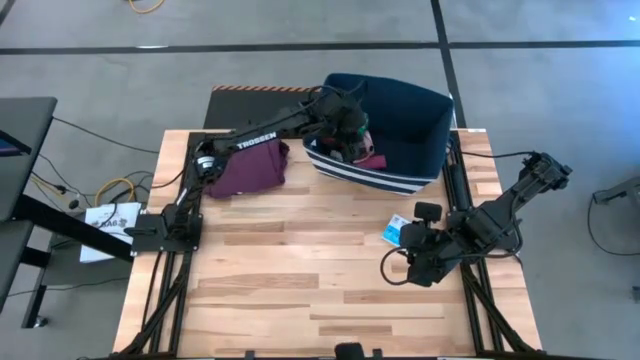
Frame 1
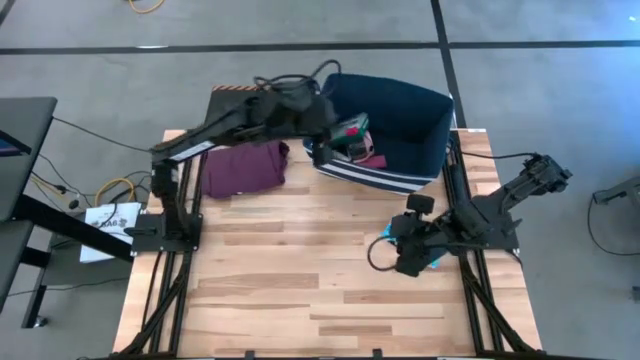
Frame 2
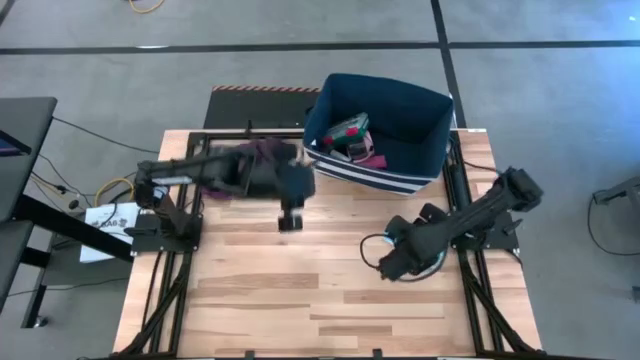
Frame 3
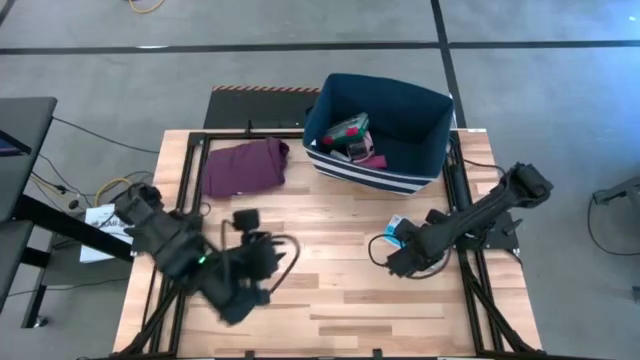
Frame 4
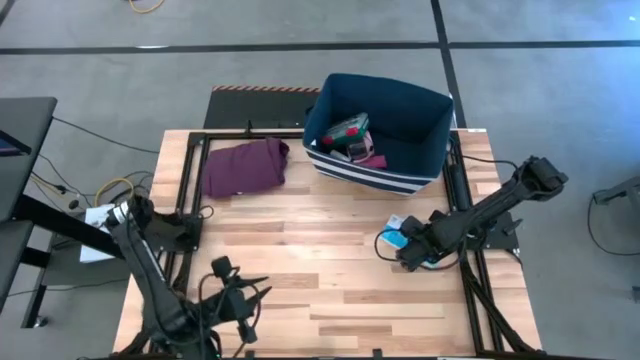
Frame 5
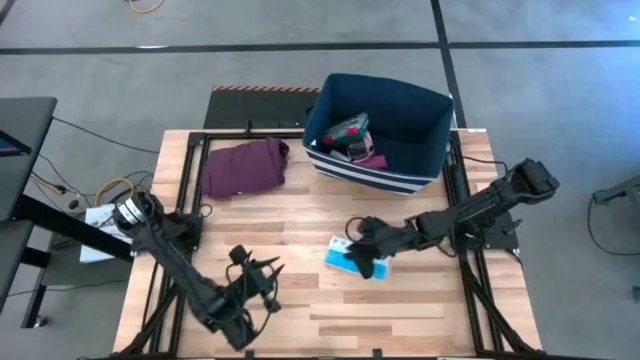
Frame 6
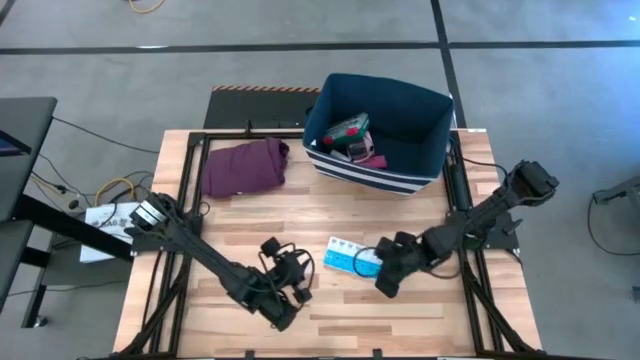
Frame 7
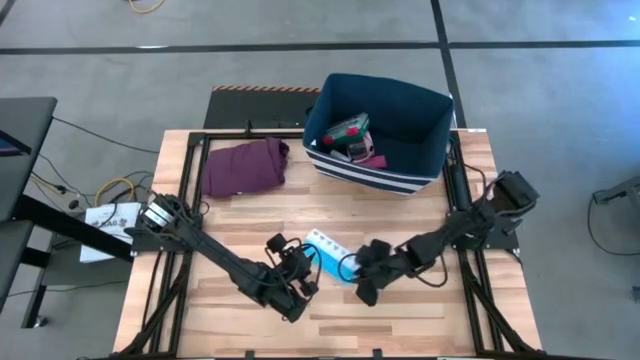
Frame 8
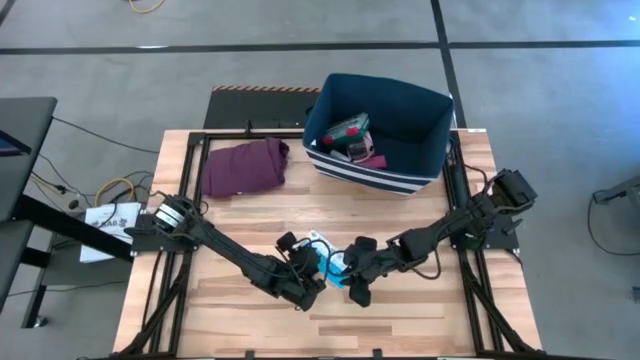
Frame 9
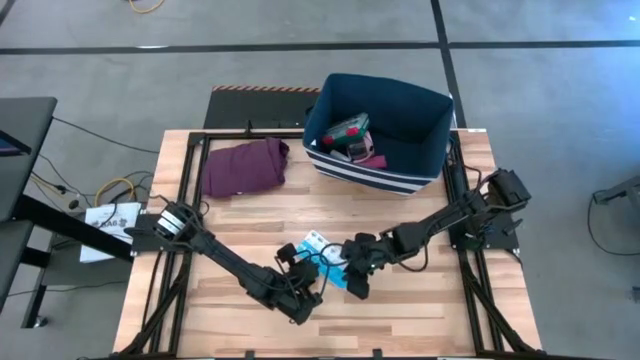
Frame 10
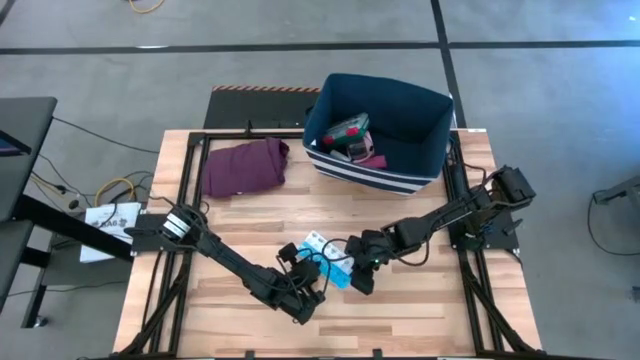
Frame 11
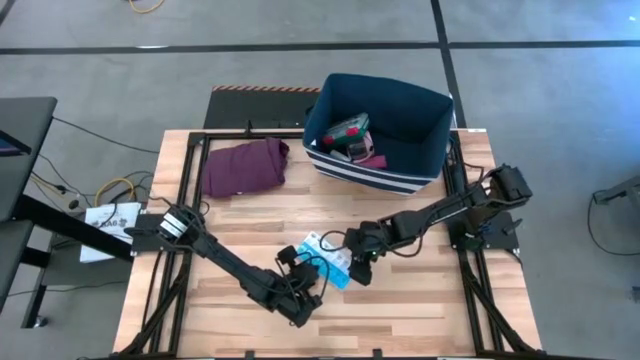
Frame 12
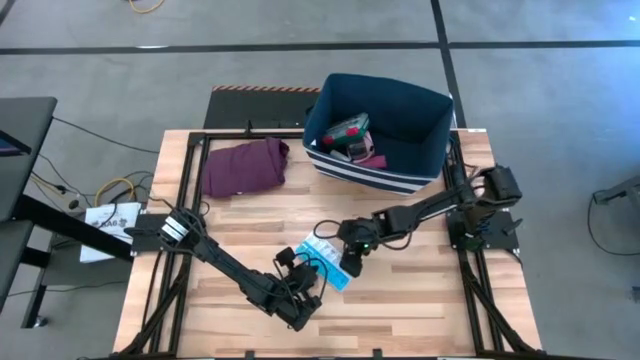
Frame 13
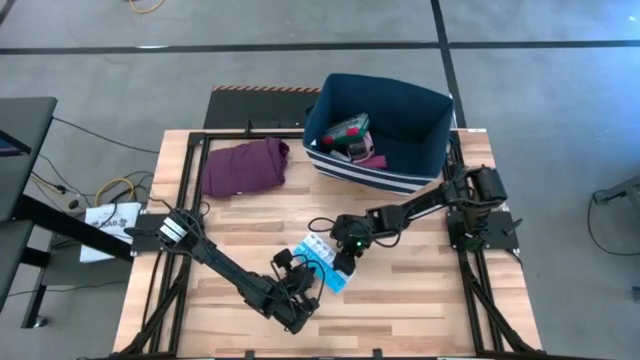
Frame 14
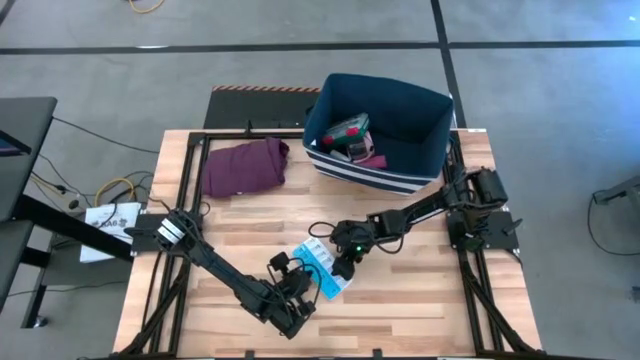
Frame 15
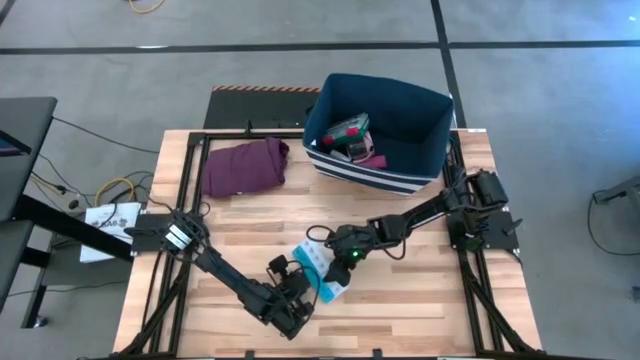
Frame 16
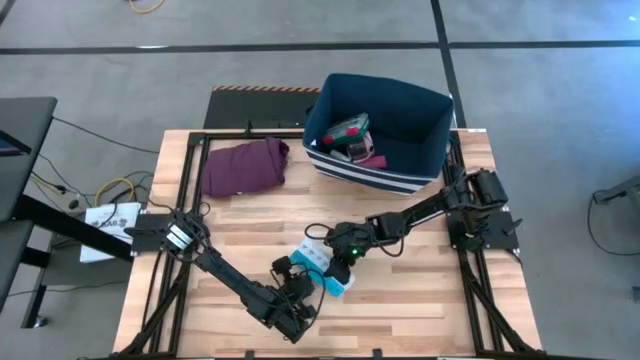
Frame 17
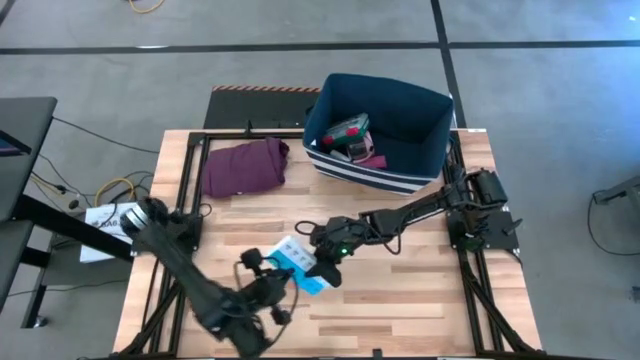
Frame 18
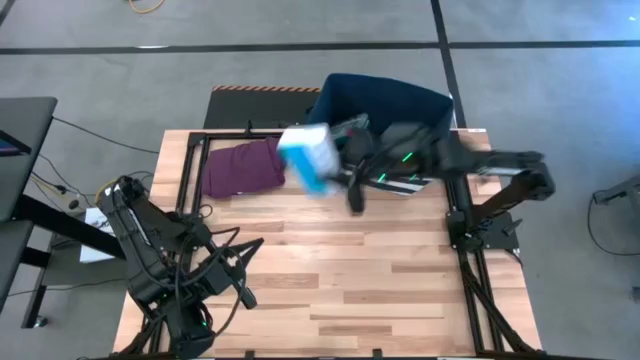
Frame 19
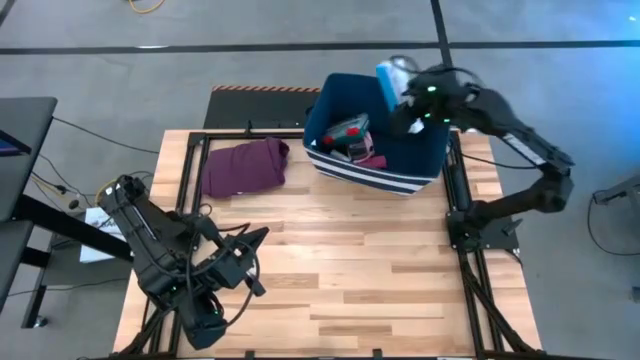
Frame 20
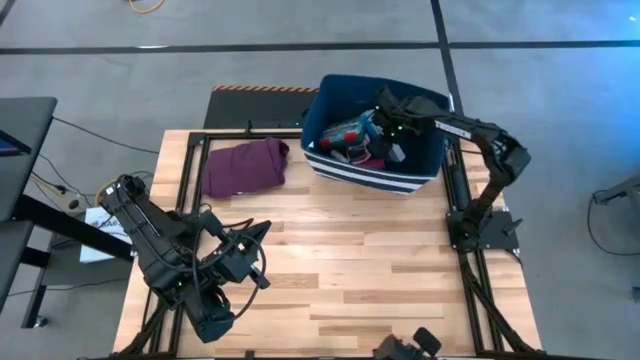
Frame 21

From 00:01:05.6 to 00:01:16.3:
Task: Pick & place medical supplies in basket/bin
Put the white and blue pill organizer into the blue bin

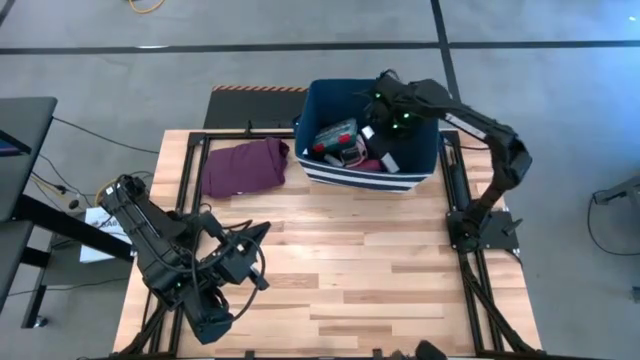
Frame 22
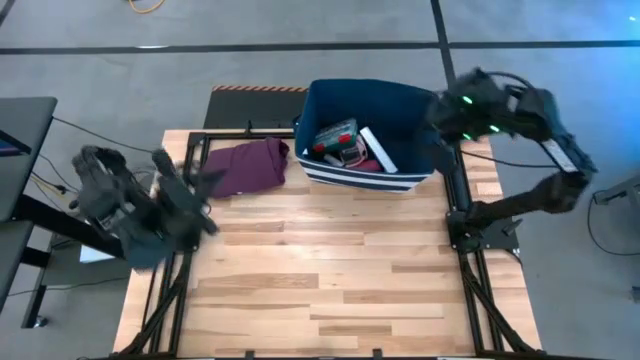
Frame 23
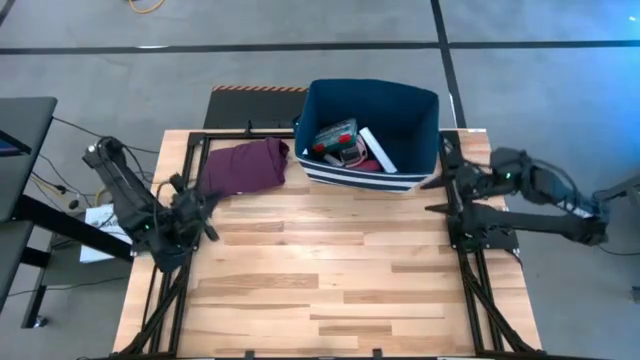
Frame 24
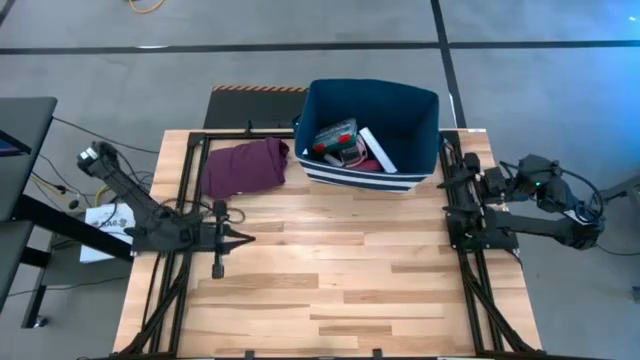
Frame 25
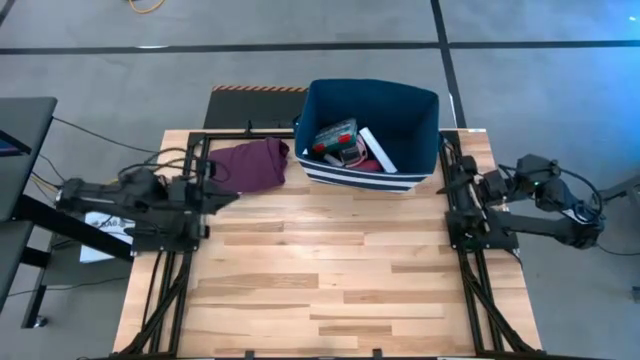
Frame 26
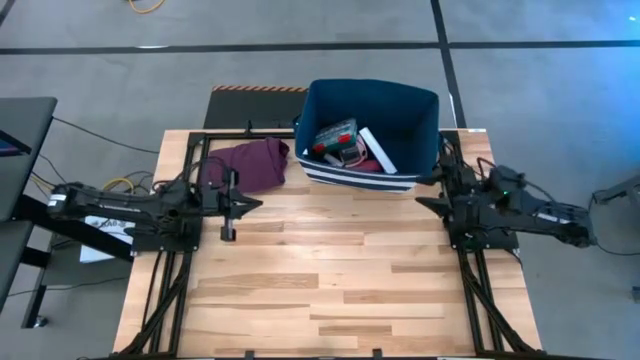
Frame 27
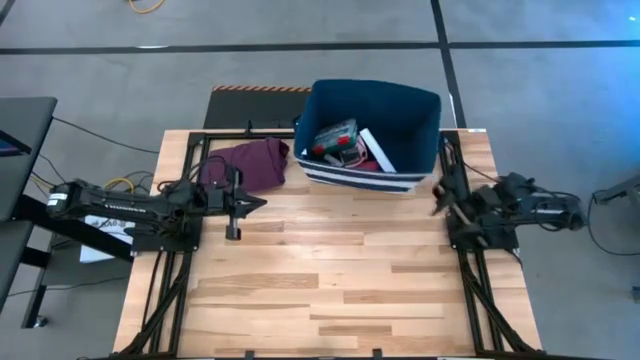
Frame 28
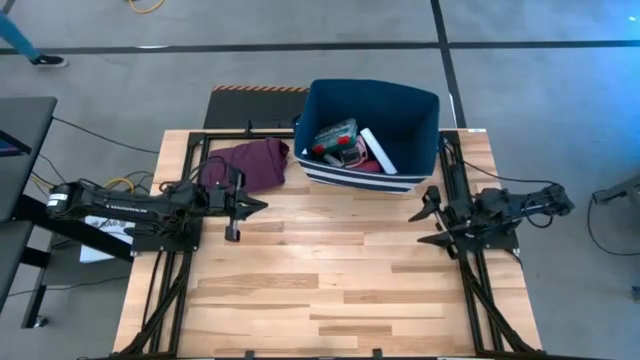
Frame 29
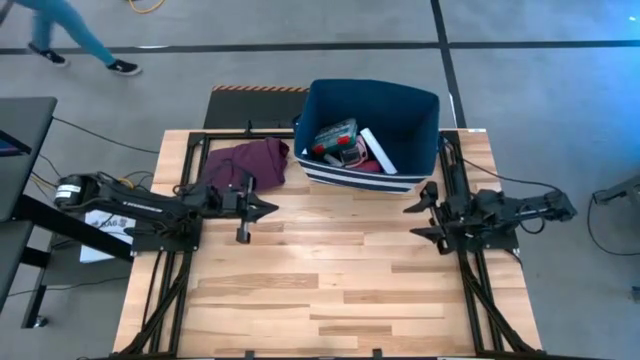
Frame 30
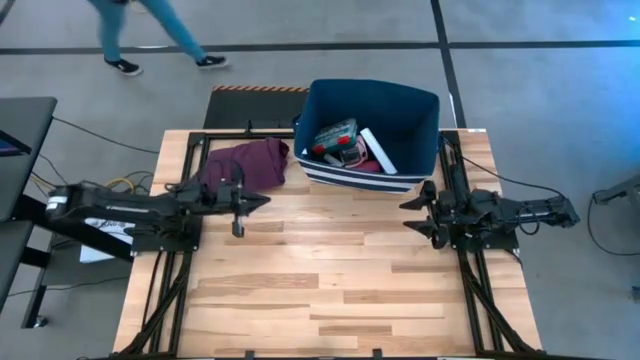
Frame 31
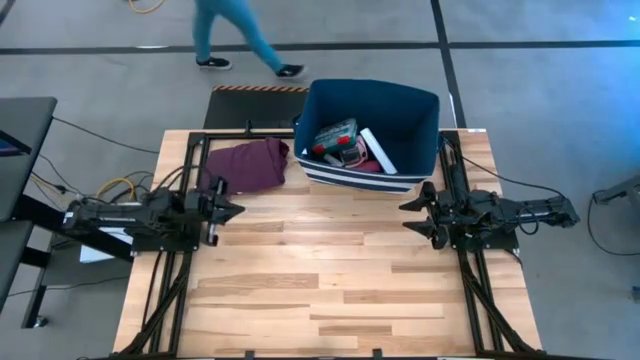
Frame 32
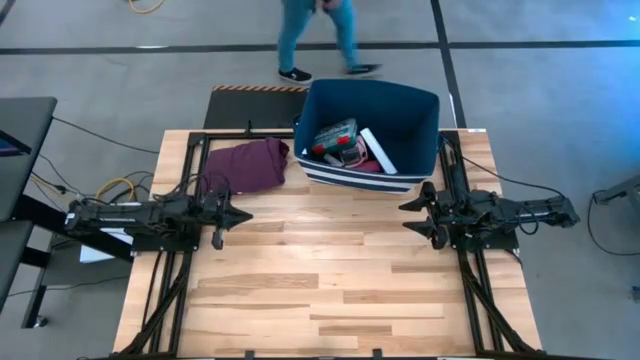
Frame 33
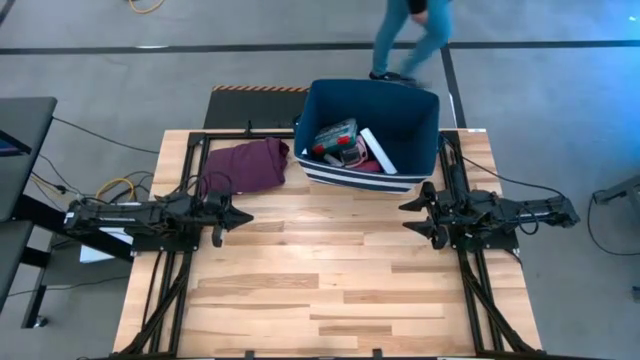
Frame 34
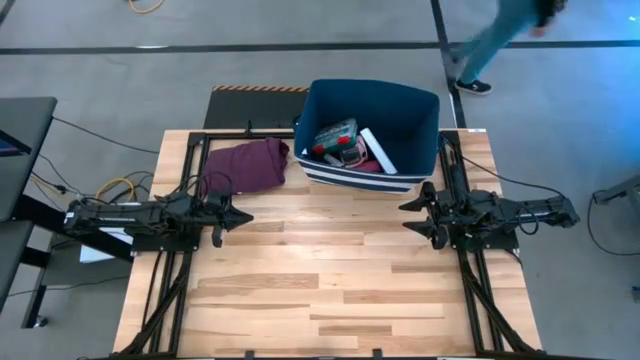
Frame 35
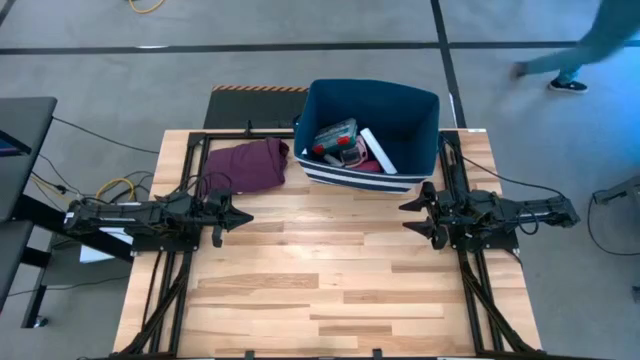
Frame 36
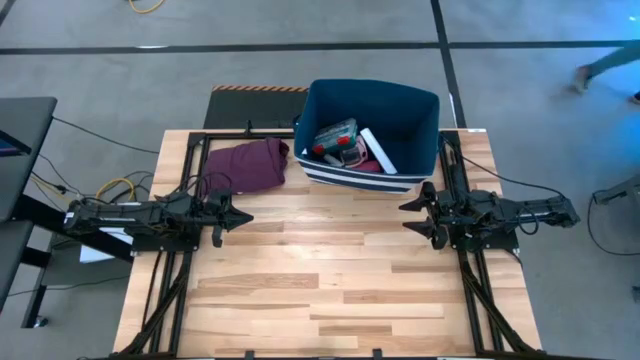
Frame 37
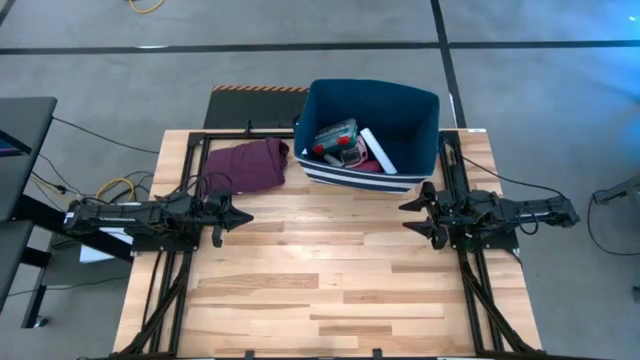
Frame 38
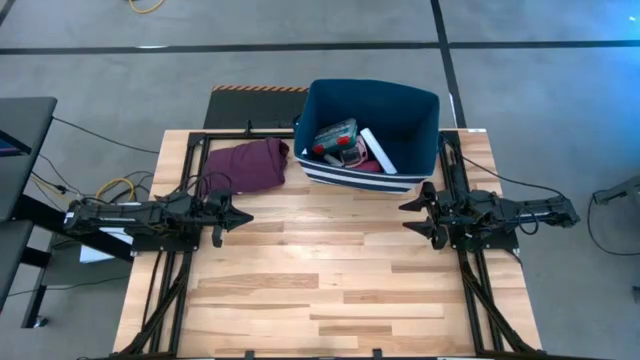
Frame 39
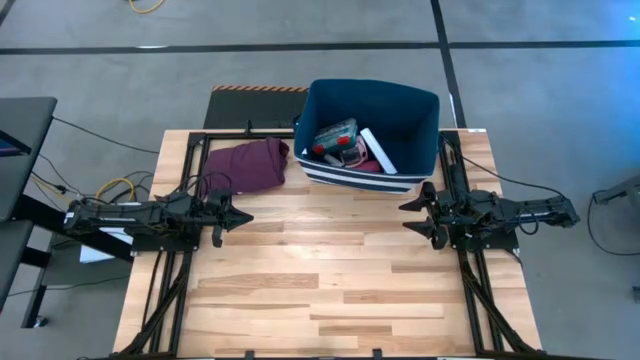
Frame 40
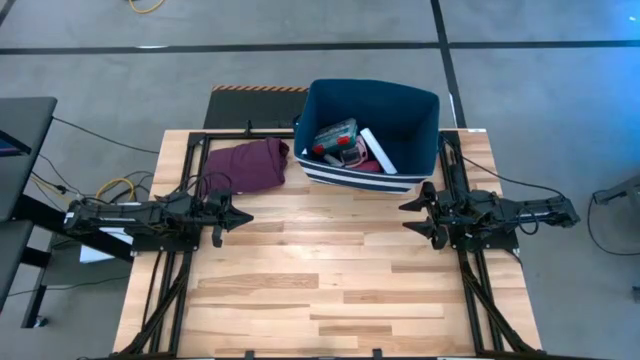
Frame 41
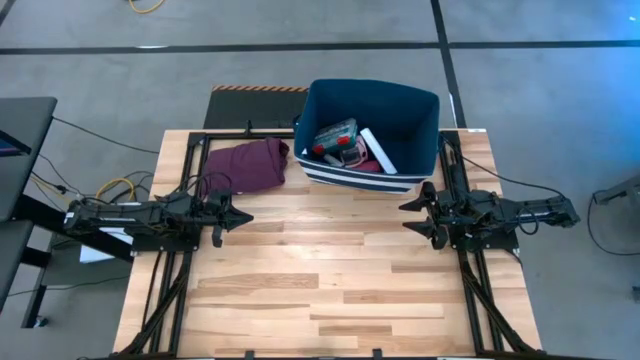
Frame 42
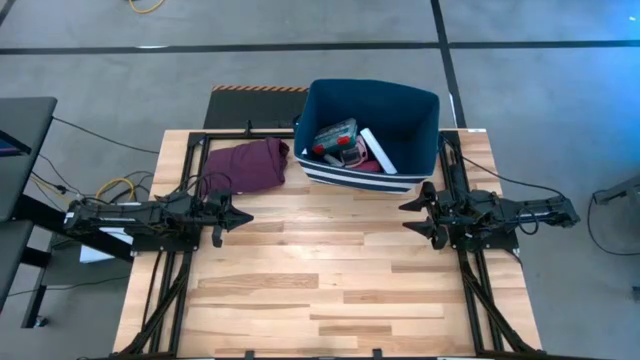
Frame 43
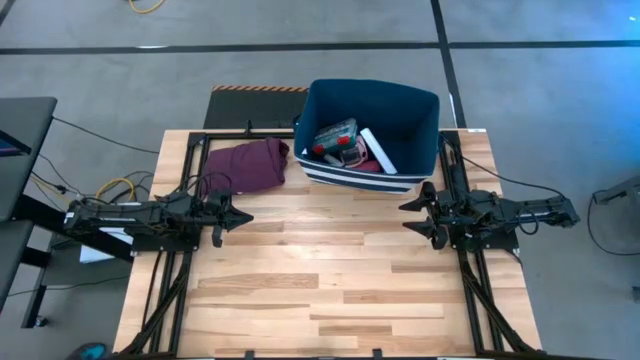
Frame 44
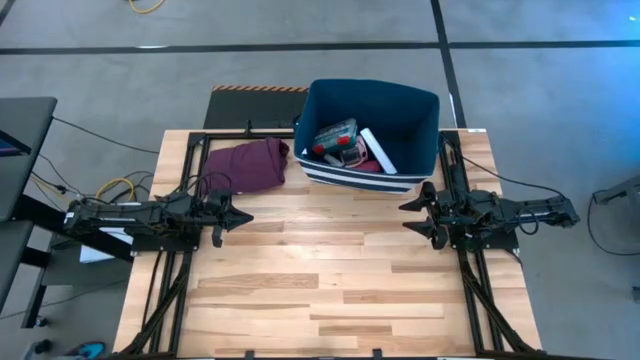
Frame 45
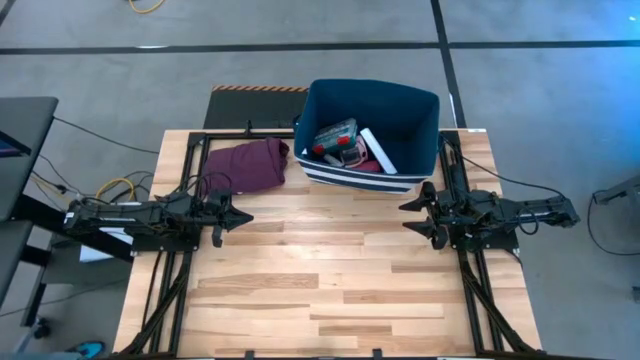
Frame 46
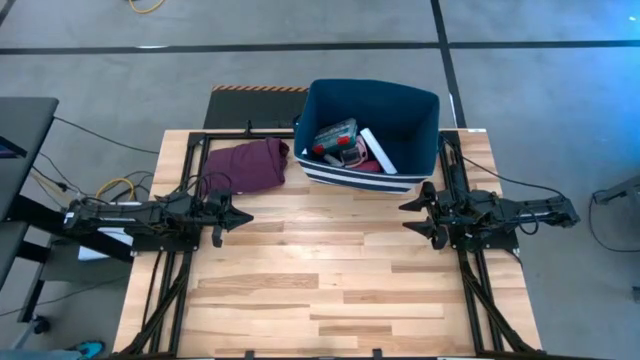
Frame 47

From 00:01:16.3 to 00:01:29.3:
Return to Home Position
